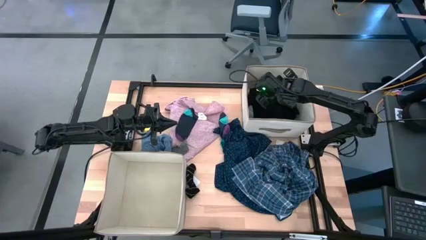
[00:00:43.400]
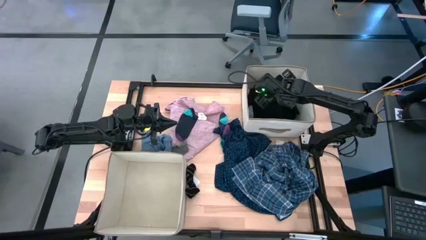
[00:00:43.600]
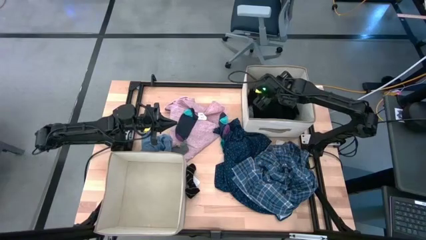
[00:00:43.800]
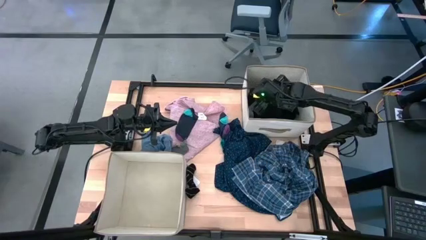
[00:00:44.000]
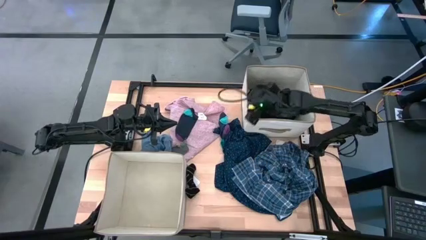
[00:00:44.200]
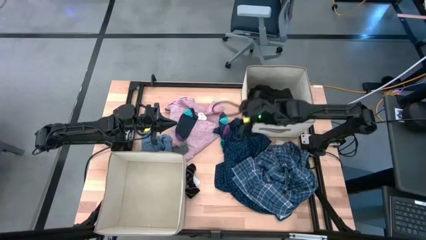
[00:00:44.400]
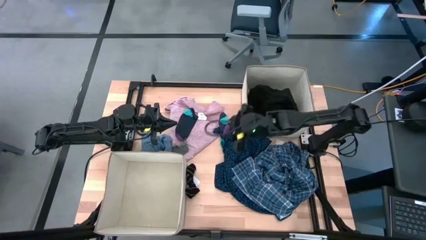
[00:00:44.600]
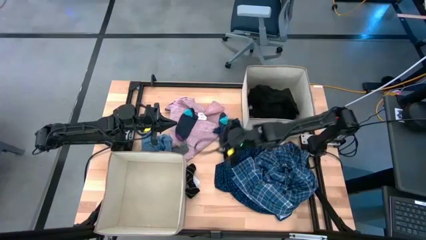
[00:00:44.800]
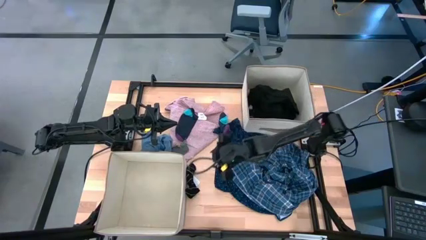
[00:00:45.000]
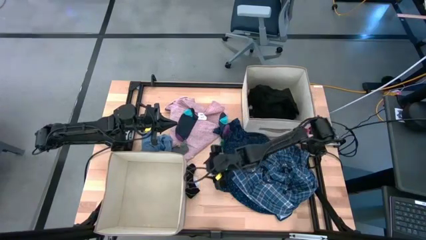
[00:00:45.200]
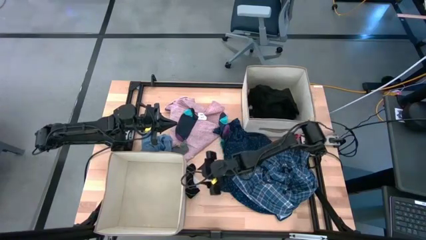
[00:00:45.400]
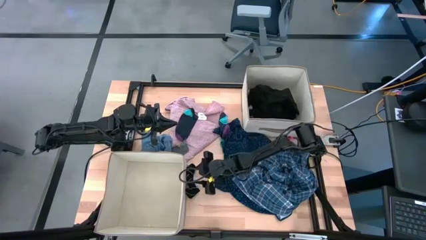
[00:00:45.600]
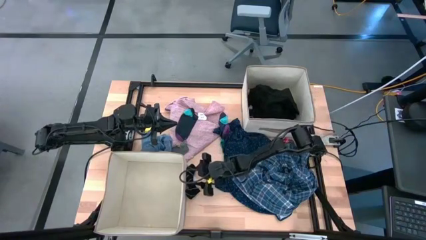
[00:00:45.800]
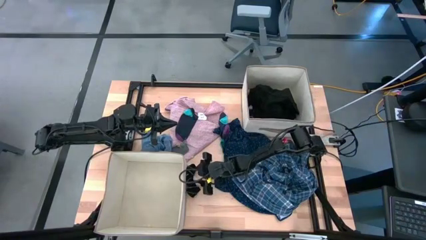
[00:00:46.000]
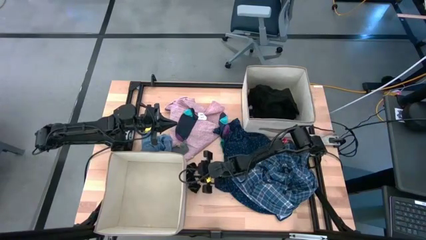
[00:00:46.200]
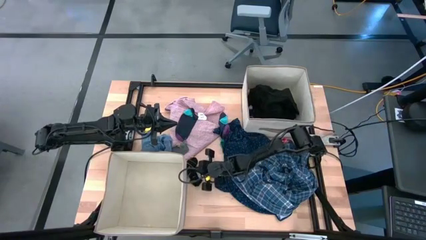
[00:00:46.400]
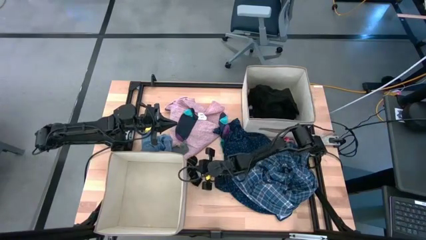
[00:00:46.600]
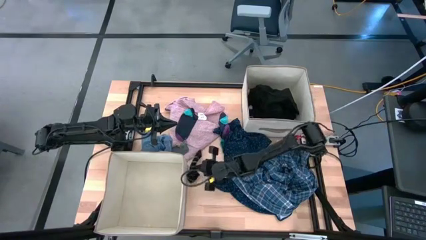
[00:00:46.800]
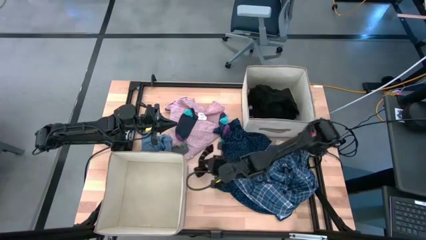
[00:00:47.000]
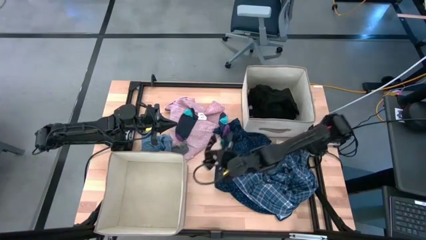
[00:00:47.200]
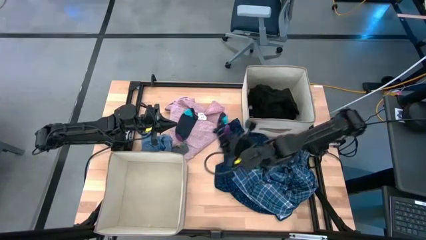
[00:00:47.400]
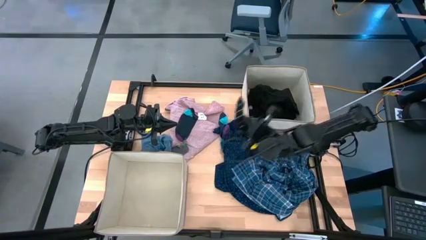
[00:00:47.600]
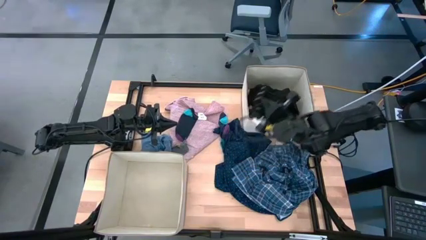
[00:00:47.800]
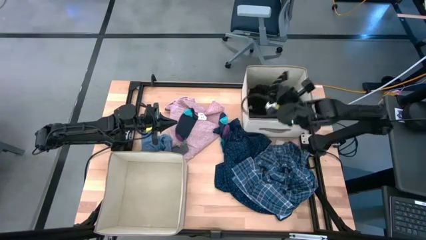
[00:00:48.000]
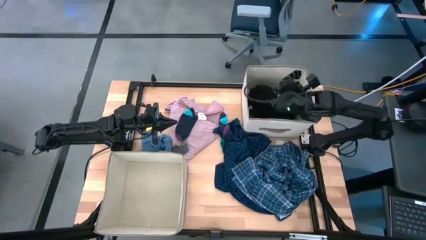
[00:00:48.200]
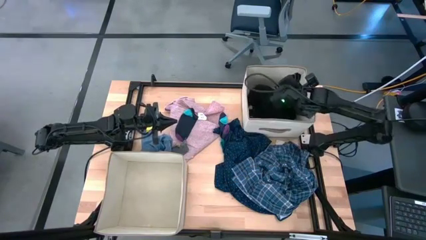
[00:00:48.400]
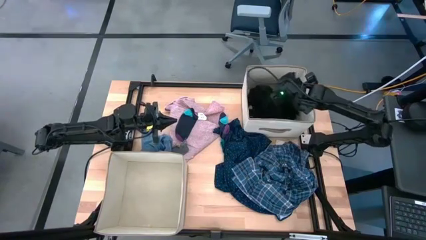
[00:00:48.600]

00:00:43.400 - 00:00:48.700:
Task: Sort clothes
Put the black striped sock into the top white laundry organizer

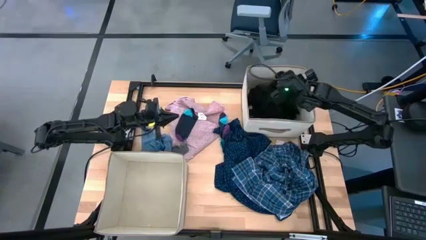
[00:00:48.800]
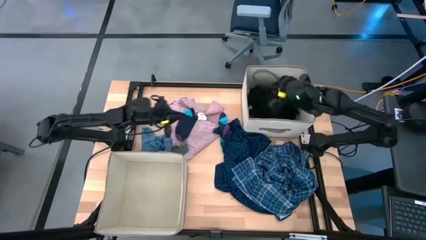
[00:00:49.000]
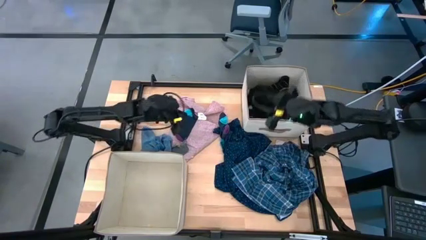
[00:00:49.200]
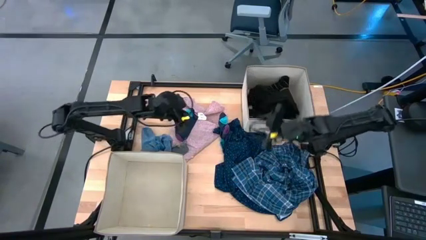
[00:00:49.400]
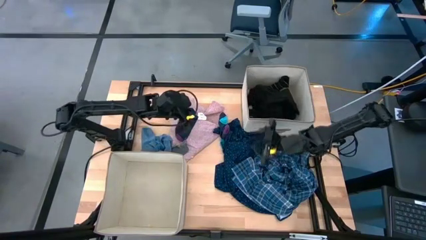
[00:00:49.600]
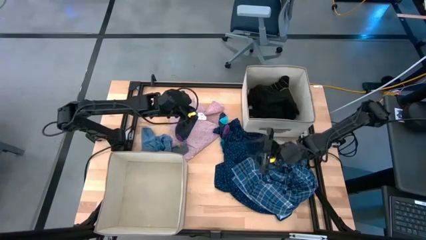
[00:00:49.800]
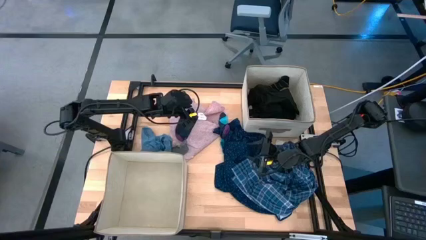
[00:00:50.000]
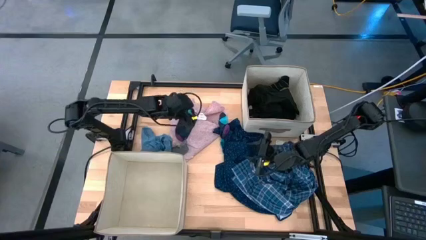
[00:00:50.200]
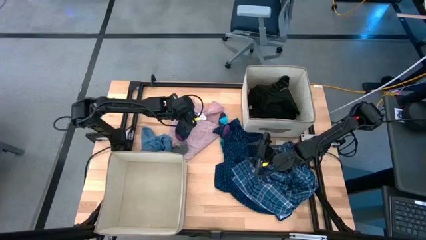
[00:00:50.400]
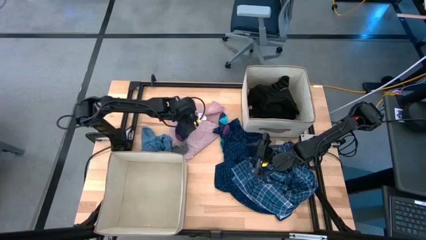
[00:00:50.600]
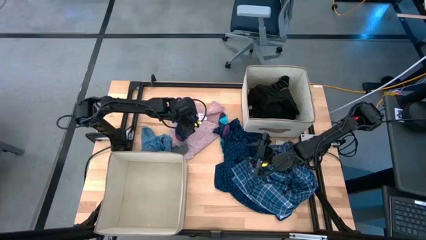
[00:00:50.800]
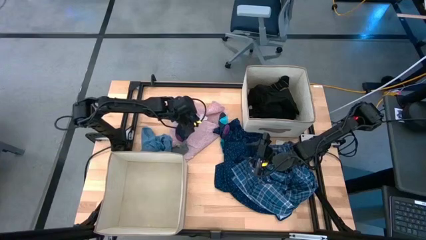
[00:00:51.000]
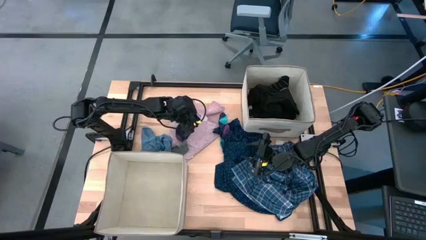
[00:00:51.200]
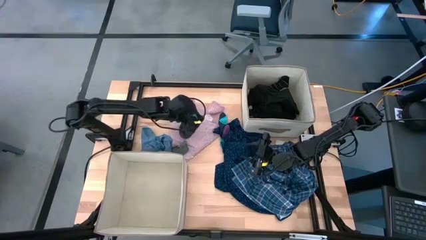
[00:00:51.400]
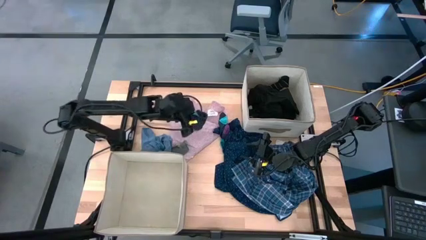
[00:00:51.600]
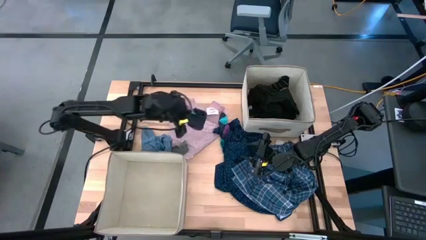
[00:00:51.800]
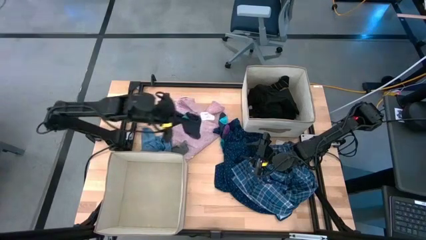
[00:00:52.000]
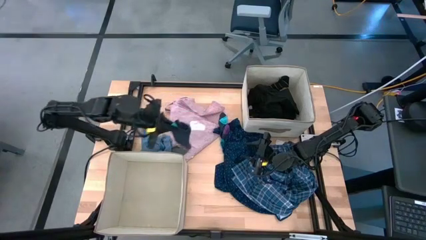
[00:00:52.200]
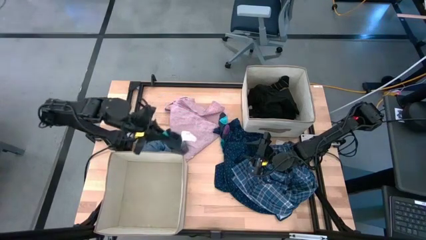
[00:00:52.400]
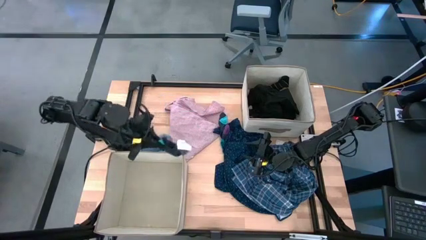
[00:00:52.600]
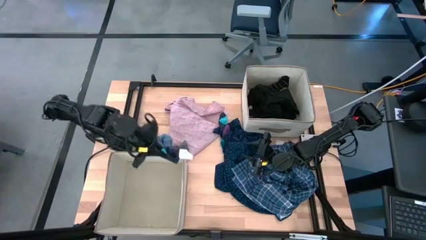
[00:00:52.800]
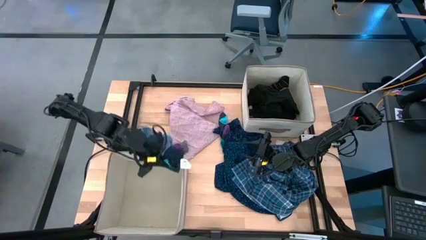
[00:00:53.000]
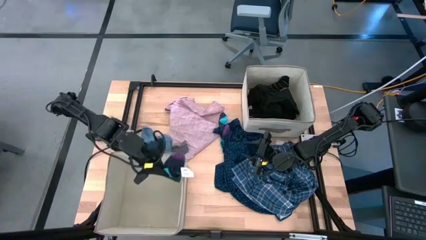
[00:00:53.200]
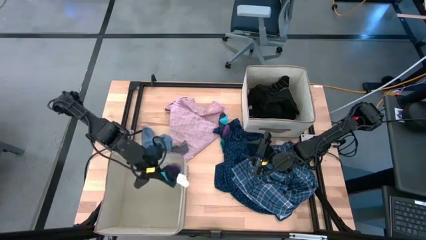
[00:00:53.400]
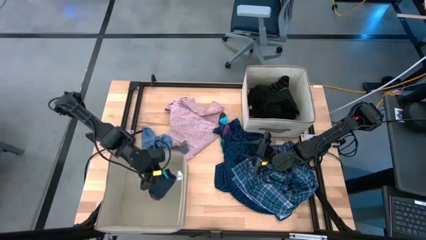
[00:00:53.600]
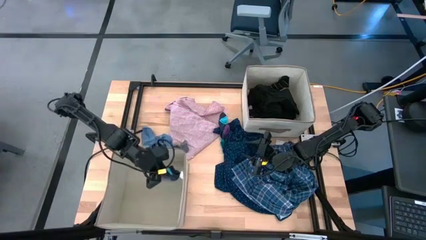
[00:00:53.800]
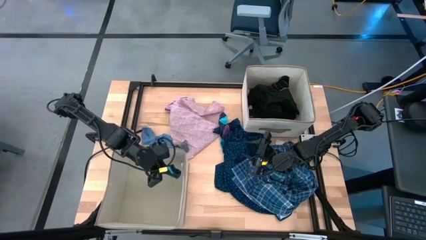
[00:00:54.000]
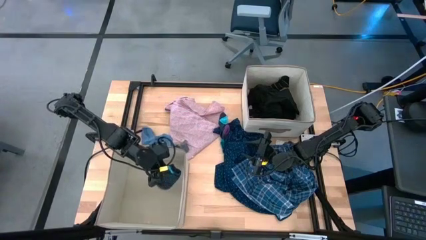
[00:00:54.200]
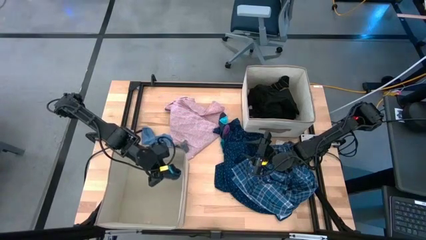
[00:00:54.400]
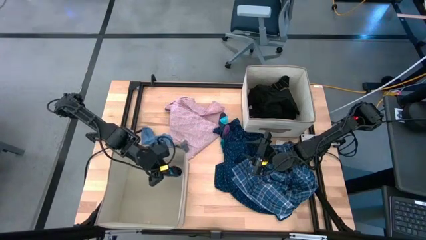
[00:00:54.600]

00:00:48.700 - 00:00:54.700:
Put the blue sock into the bottom white laundry organizer

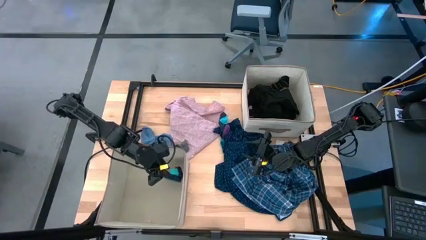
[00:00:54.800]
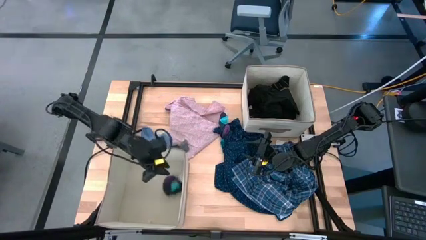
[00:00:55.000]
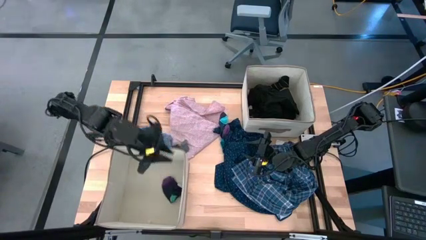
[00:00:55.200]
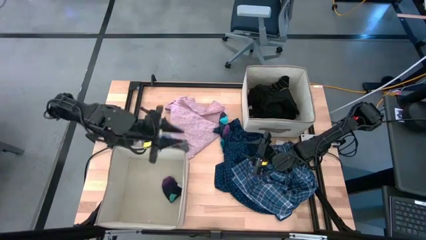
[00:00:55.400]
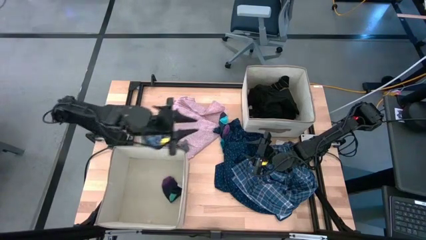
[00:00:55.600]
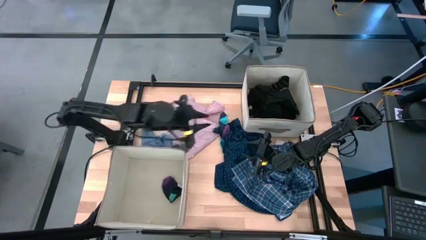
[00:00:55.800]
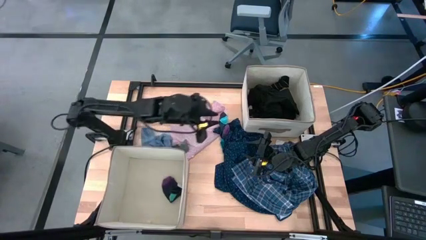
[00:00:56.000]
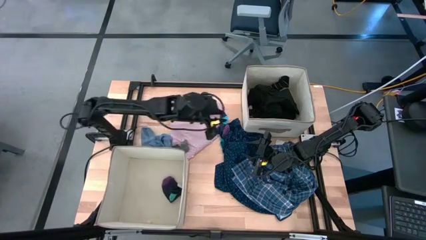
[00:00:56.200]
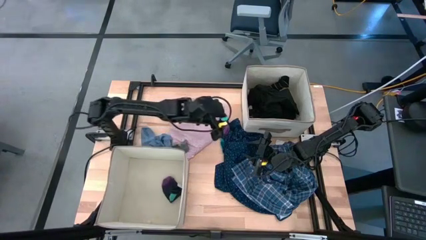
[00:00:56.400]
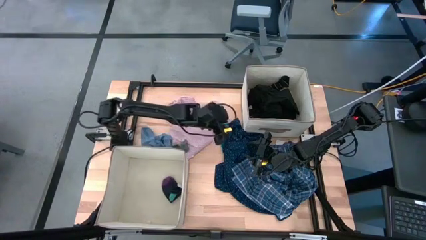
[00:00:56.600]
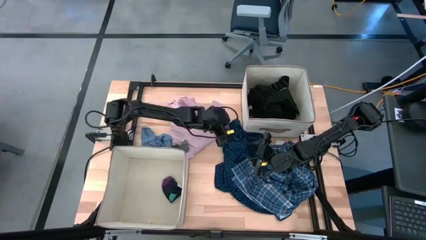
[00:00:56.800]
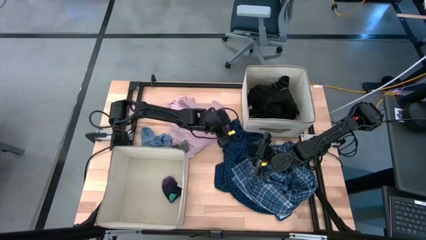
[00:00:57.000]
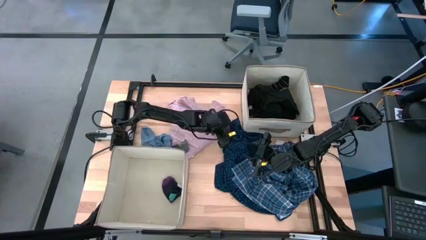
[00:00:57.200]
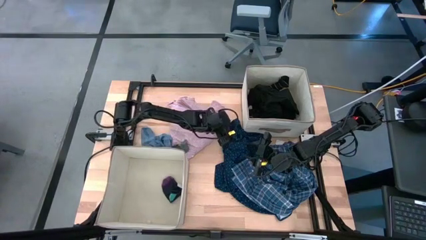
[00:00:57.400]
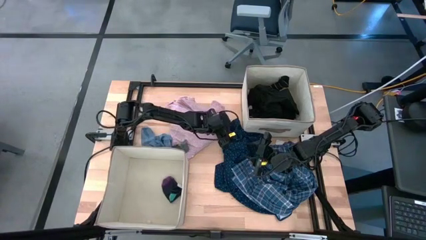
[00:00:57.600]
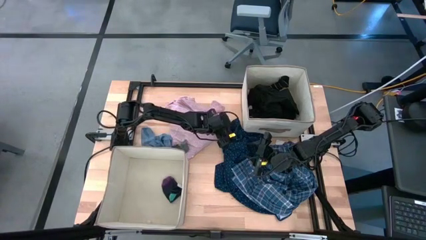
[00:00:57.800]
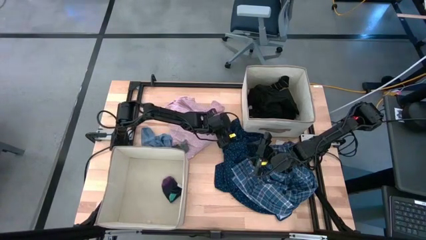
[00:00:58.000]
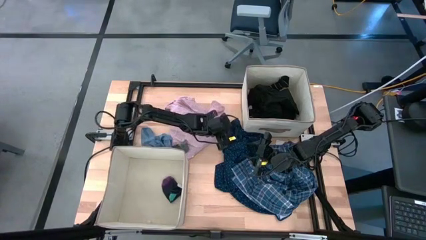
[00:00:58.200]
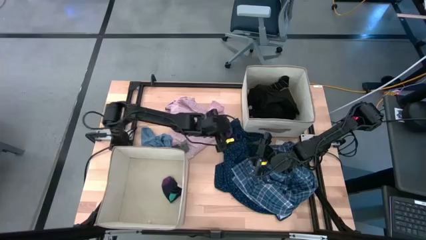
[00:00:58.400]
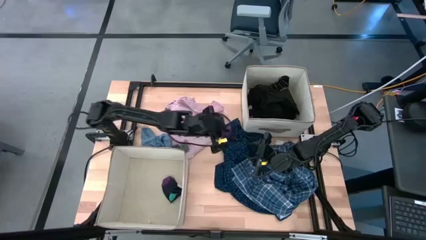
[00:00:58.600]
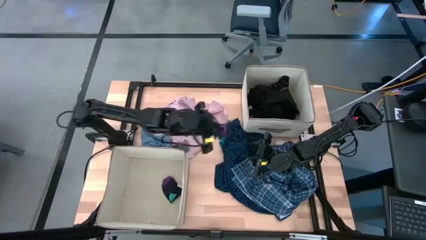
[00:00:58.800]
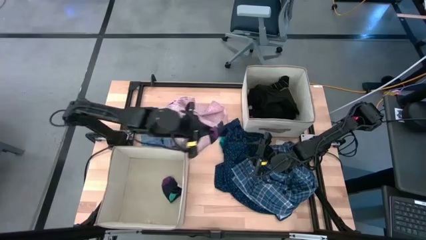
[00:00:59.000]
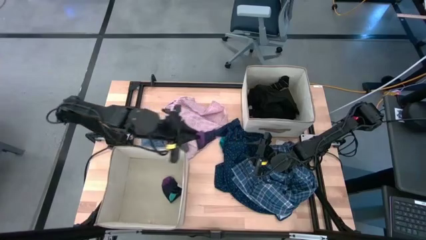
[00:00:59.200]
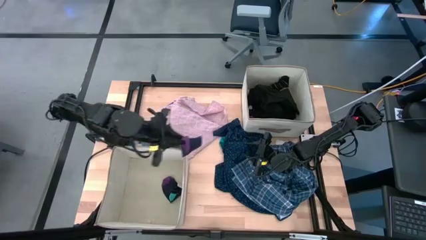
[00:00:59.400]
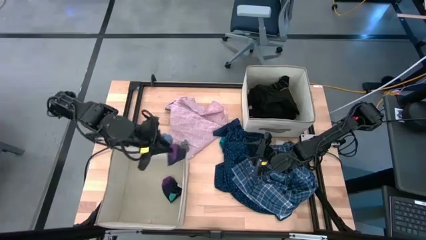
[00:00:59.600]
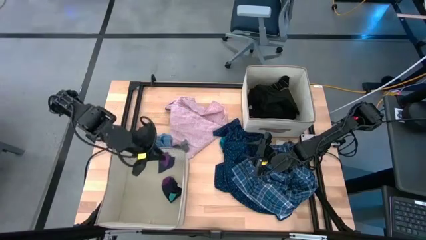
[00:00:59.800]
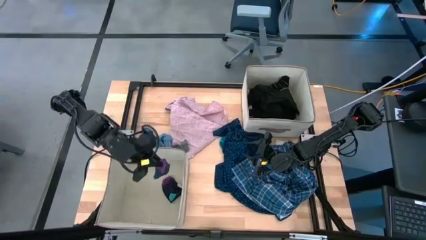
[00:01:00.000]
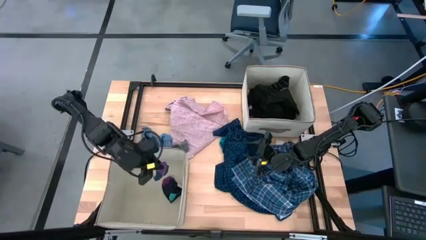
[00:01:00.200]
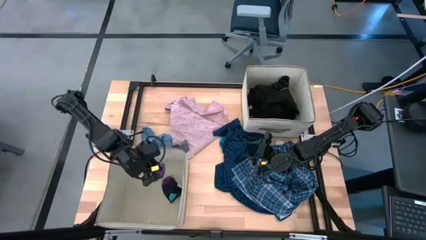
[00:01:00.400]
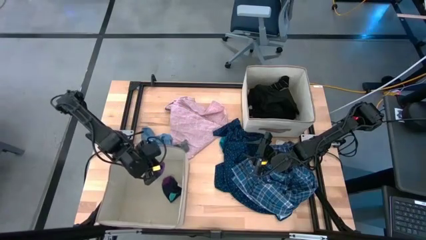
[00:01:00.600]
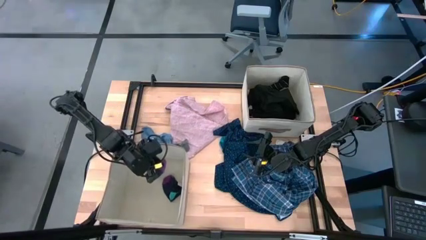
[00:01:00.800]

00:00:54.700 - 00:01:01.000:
Put the blue sock into the bottom white laundry organizer
